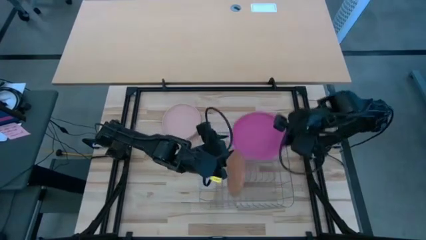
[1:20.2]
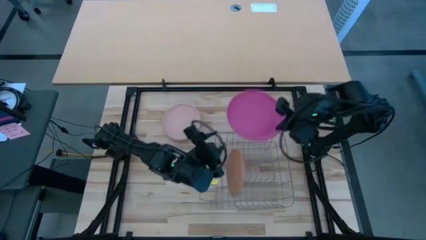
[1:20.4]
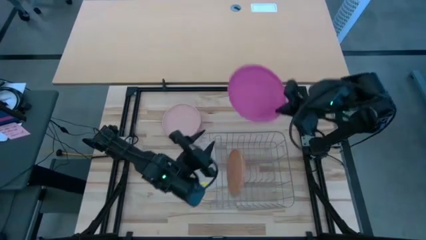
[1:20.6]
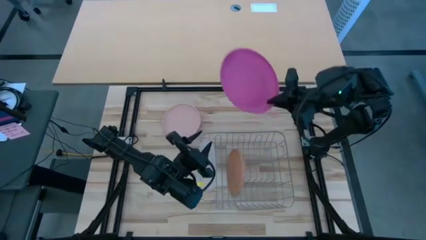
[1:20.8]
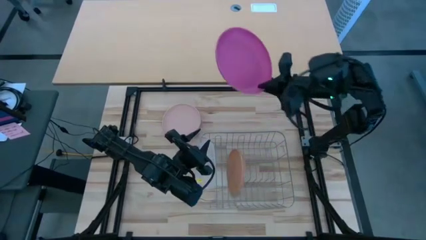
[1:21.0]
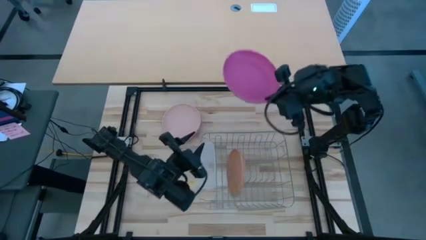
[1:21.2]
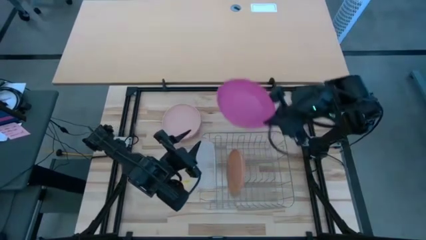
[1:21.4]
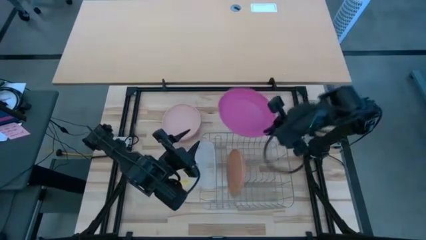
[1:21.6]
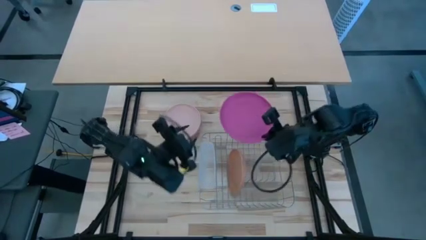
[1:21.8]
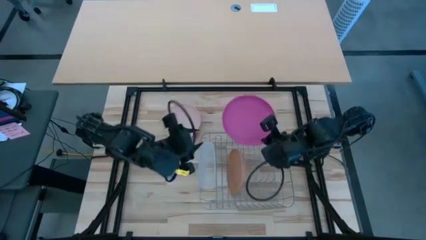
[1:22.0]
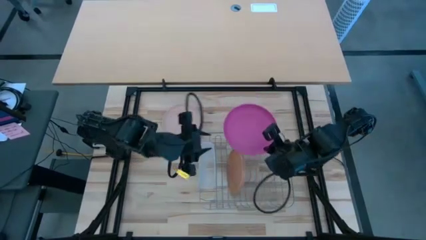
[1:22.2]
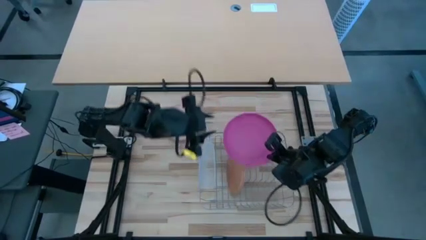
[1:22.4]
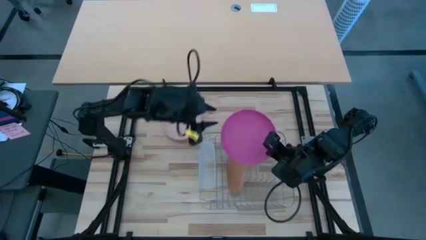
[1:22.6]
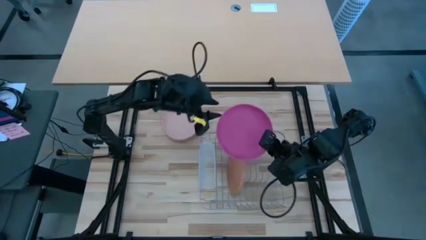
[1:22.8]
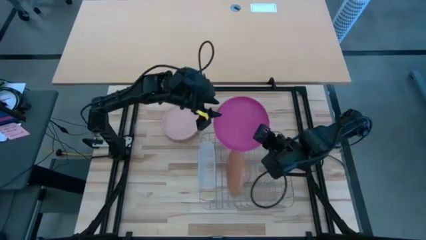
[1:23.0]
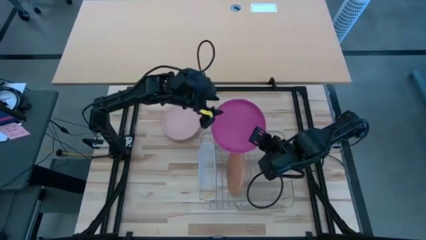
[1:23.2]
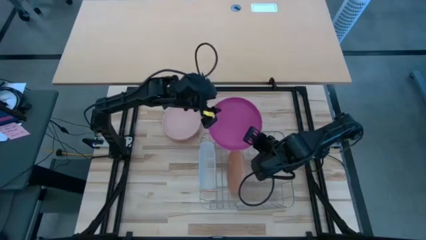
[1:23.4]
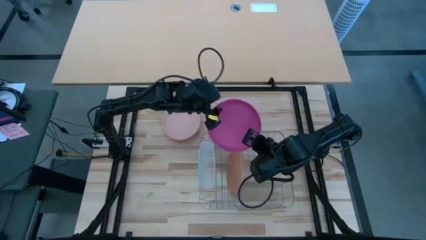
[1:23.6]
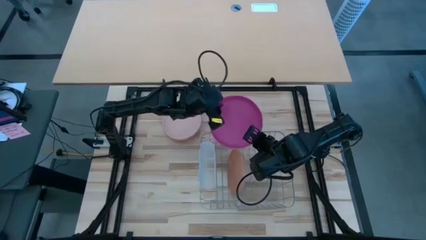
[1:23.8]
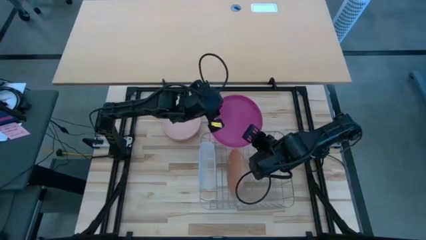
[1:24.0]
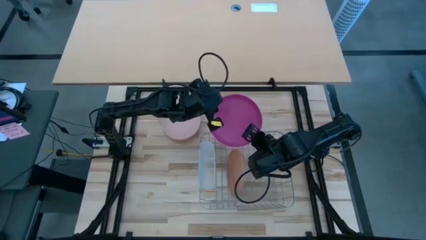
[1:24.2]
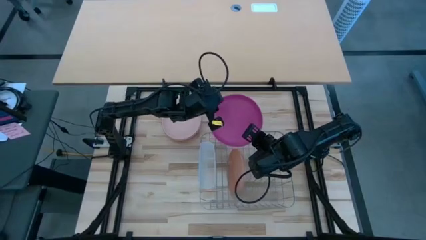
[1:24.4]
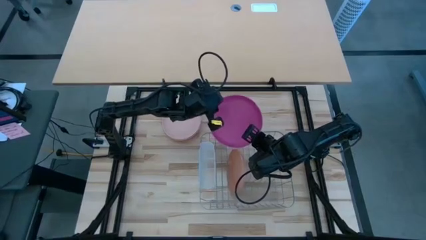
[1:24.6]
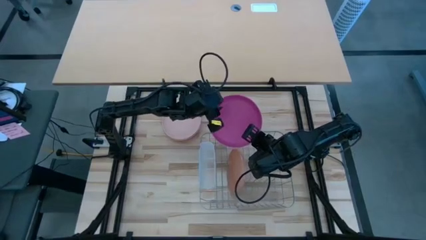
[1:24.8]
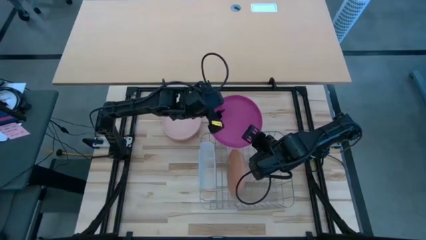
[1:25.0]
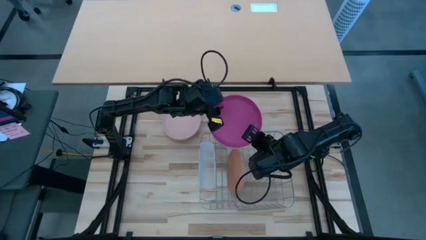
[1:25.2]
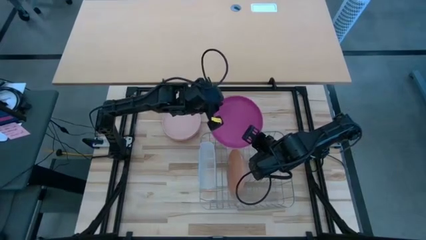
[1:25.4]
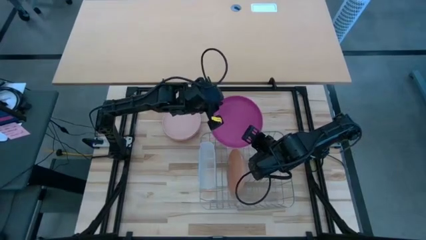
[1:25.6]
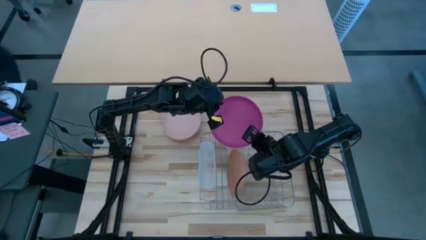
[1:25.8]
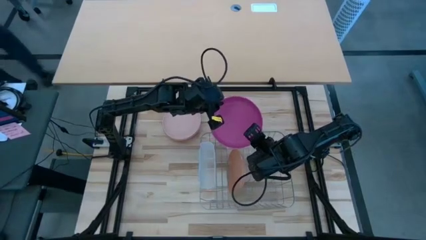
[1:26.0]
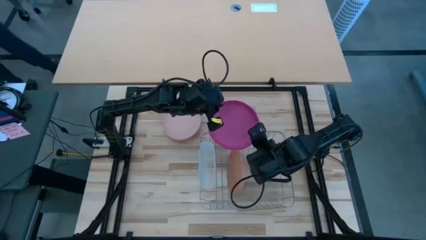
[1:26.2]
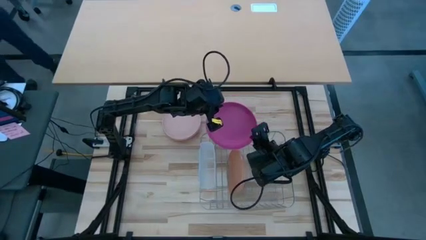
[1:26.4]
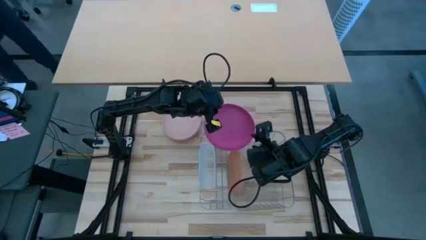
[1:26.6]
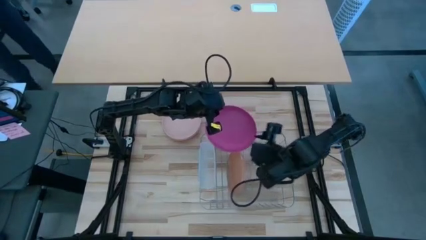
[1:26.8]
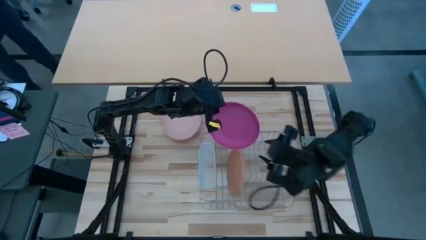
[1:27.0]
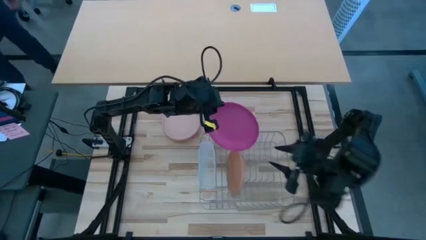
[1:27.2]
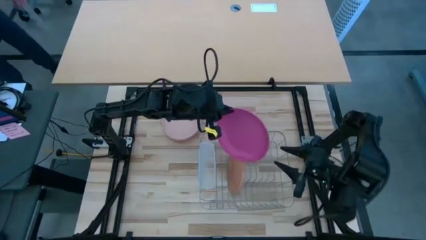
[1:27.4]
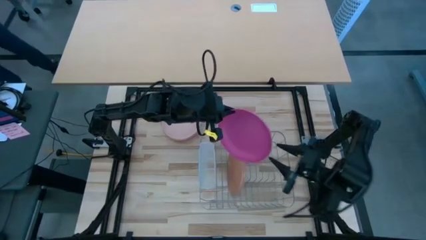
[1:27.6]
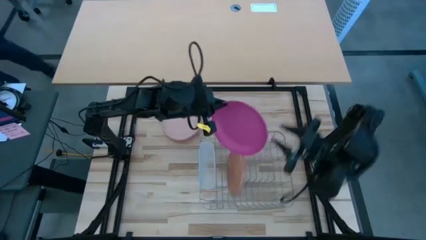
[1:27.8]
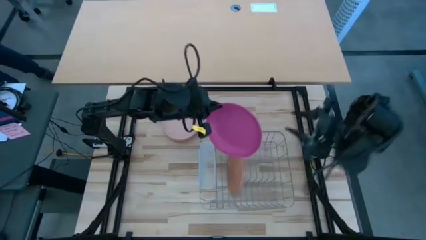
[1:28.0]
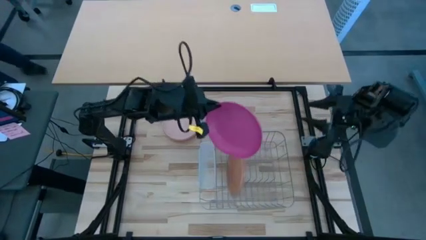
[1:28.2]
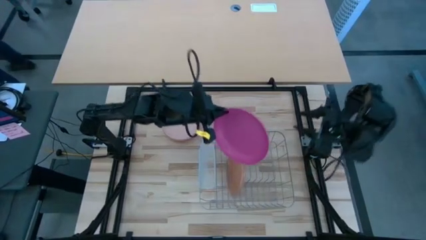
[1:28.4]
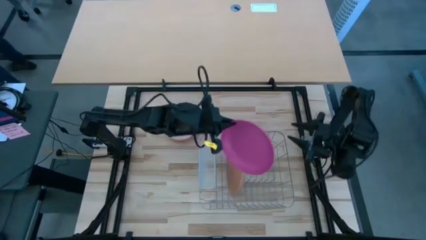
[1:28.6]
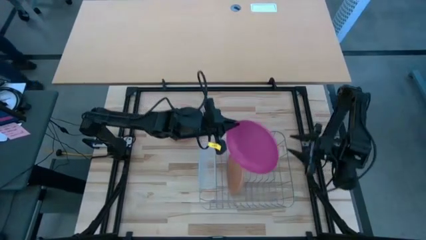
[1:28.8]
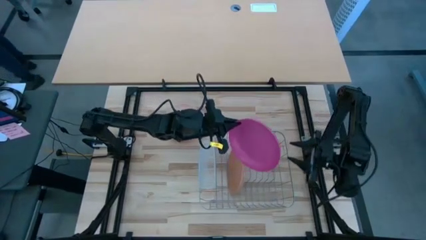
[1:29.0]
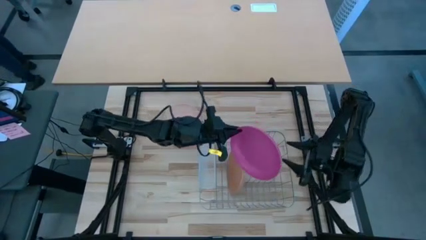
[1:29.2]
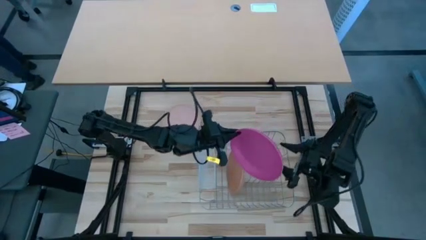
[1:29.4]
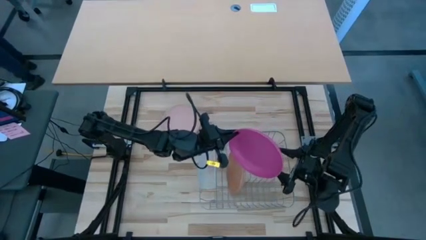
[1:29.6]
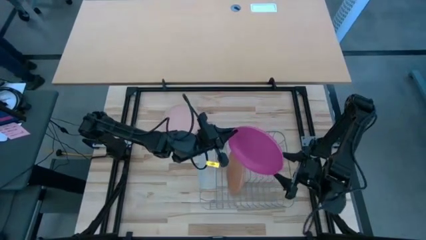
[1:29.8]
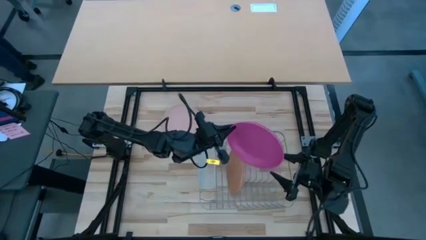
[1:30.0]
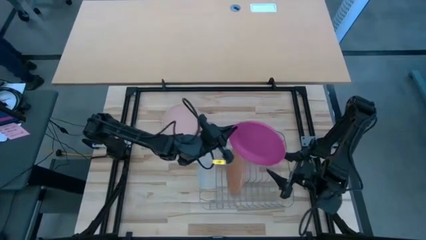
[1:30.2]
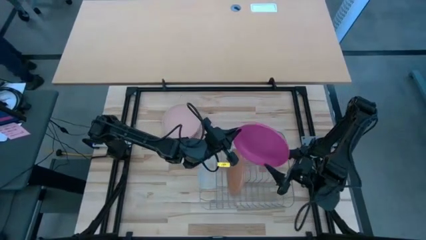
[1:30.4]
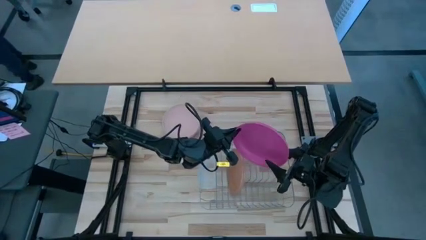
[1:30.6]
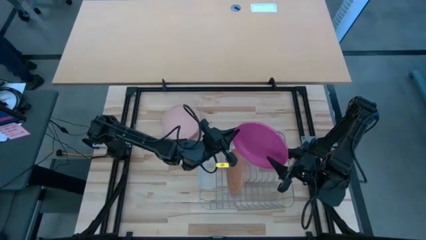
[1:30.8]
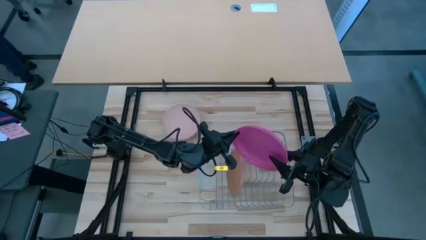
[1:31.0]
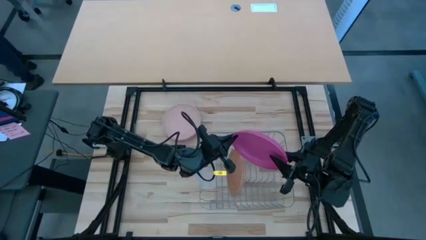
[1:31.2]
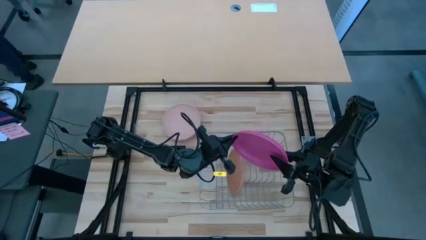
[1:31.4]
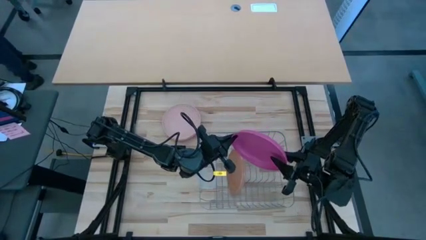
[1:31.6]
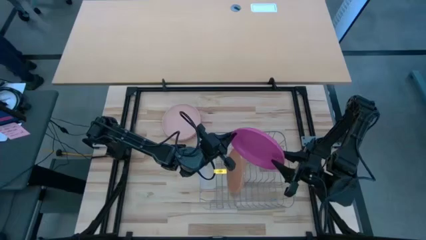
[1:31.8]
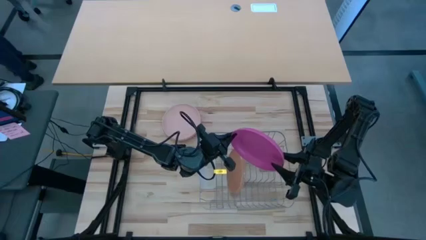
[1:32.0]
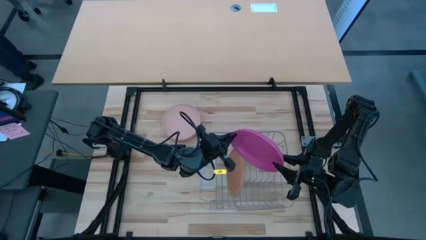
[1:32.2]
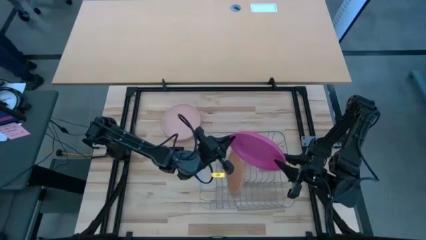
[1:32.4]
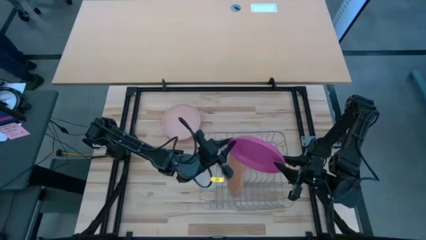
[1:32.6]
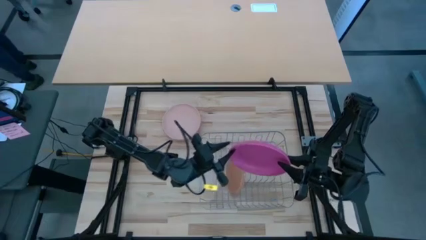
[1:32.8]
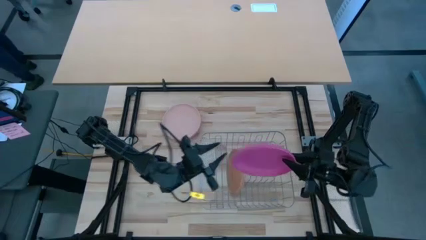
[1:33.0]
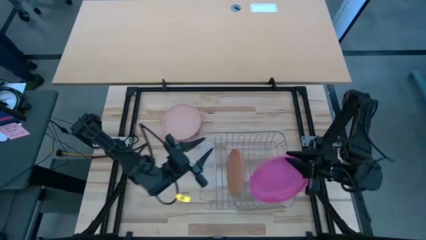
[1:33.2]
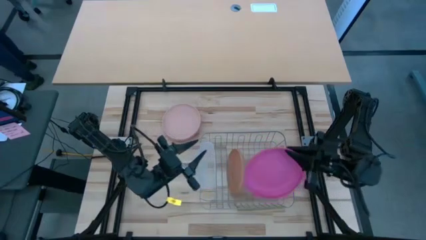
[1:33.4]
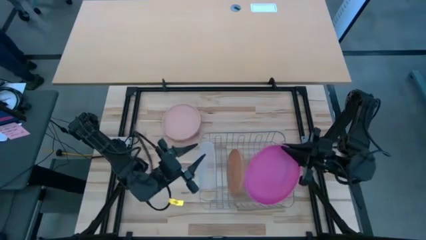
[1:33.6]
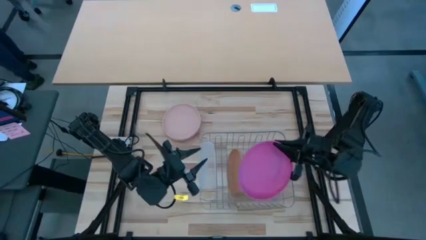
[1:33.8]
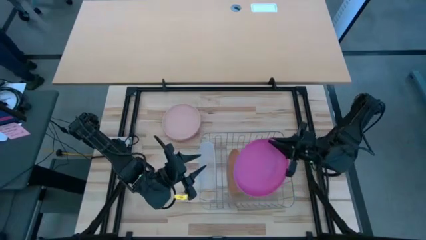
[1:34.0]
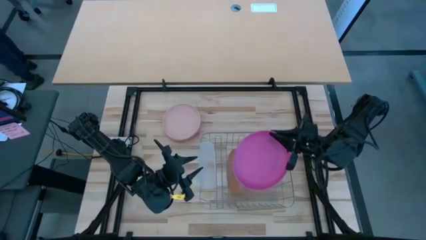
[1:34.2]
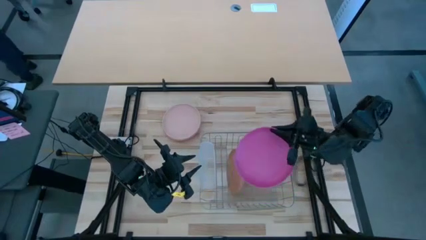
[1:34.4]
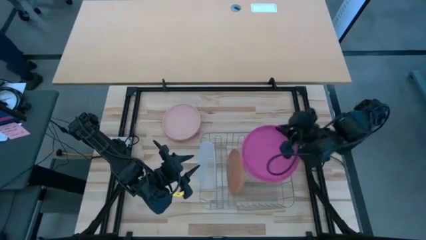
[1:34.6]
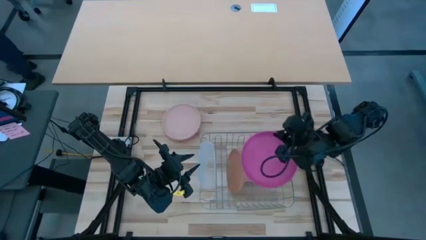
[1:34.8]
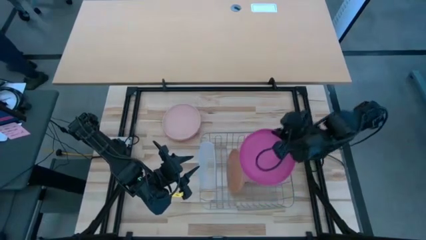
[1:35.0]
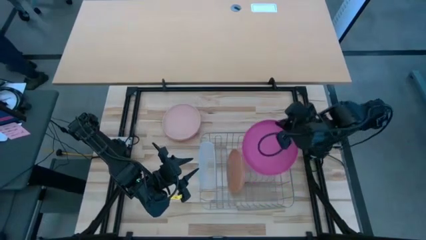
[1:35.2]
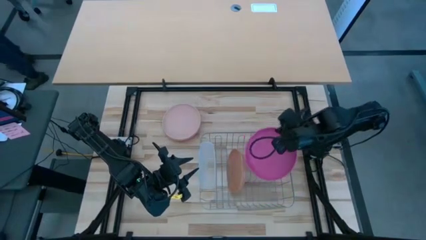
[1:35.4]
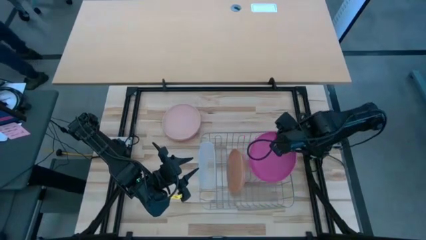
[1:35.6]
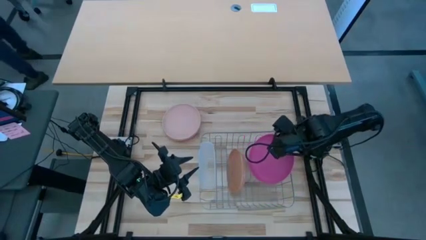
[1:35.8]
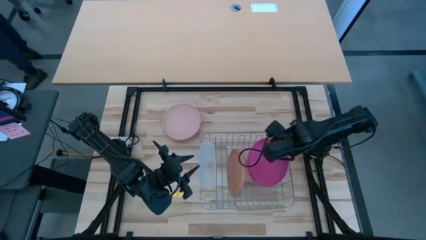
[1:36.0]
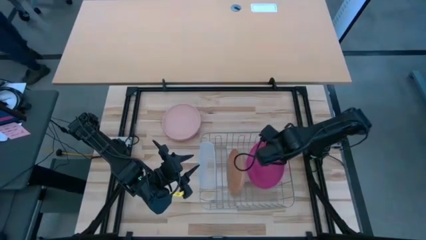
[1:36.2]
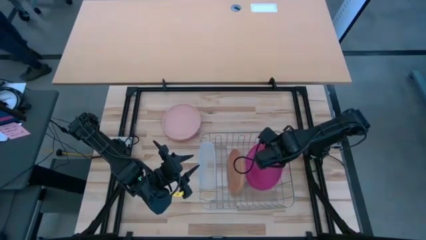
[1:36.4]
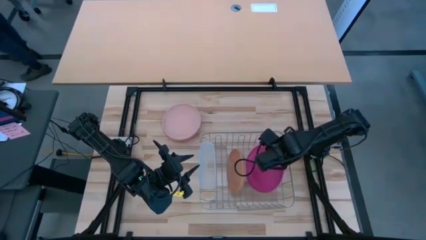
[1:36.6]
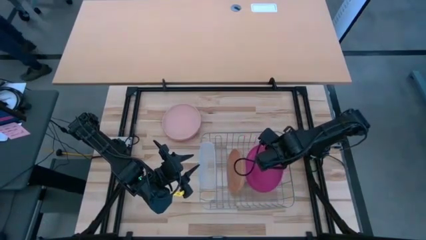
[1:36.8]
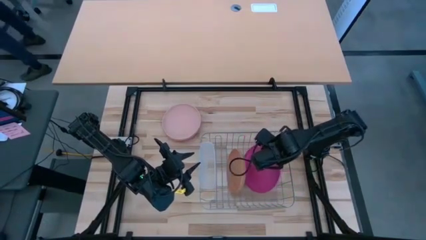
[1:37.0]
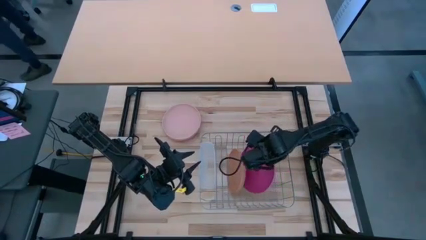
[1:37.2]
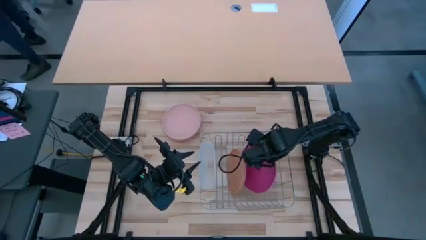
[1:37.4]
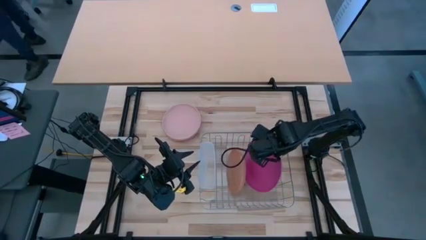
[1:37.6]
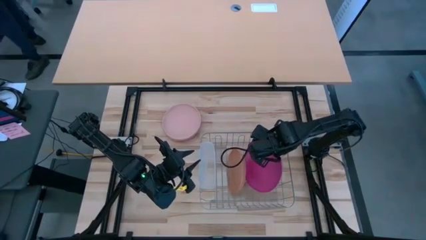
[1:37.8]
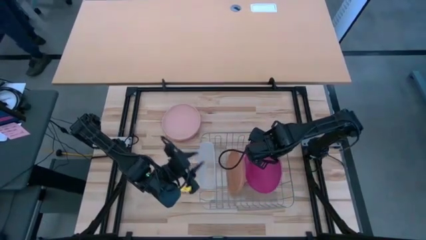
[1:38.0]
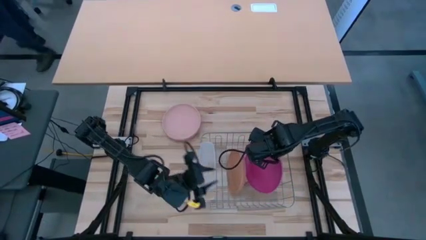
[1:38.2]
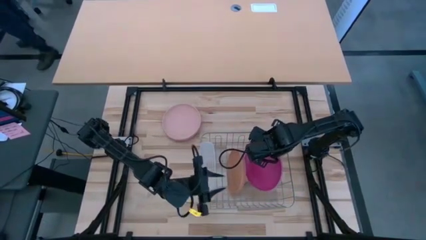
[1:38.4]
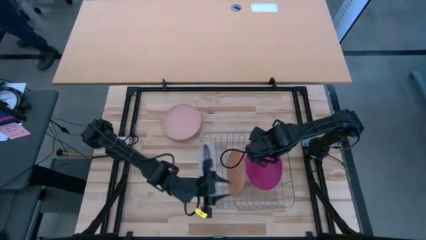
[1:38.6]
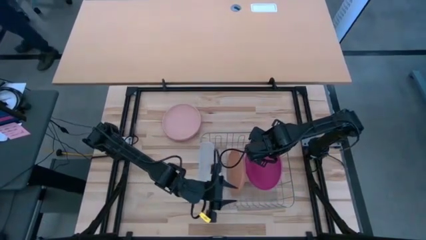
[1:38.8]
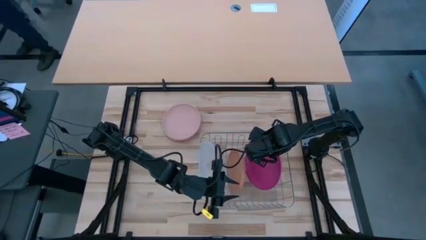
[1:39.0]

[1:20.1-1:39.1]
Task: Sort dishes
Put the pink plate in the dish rack
